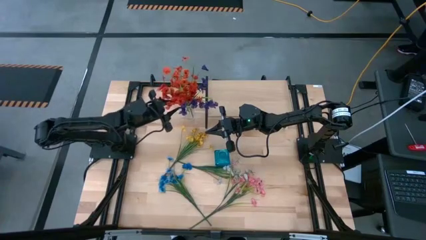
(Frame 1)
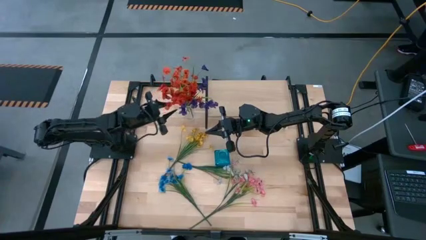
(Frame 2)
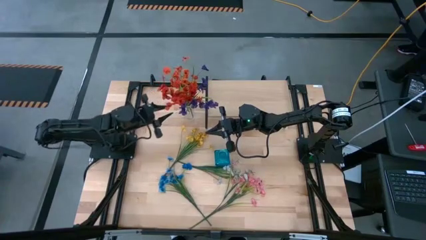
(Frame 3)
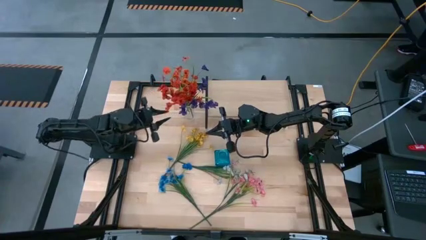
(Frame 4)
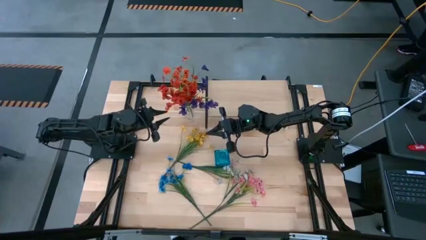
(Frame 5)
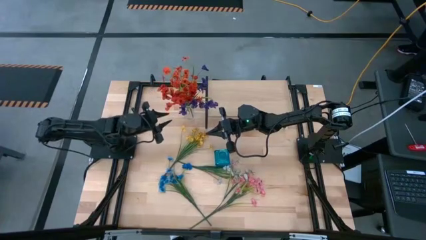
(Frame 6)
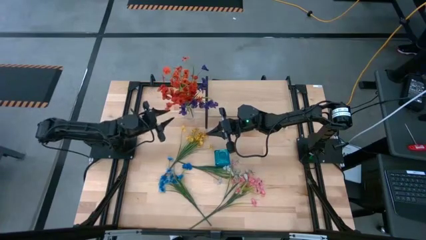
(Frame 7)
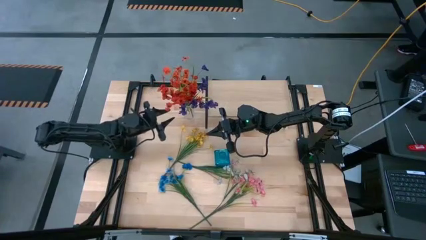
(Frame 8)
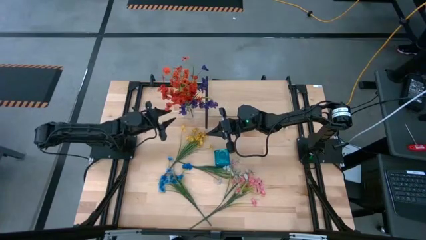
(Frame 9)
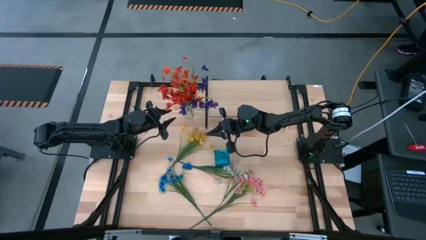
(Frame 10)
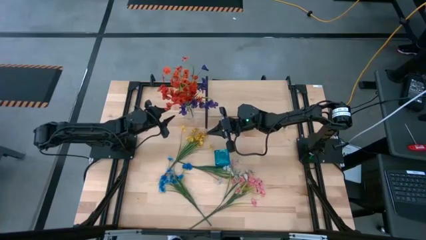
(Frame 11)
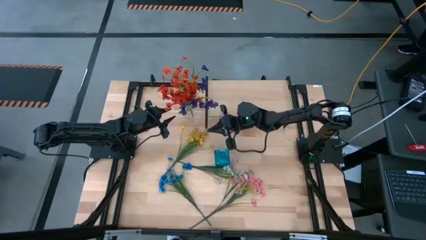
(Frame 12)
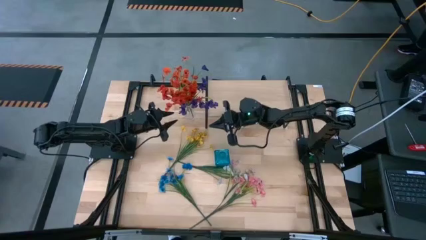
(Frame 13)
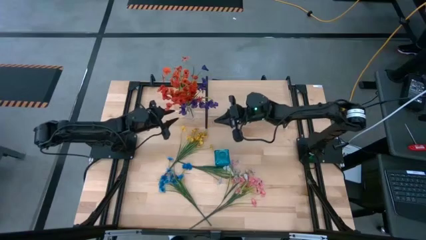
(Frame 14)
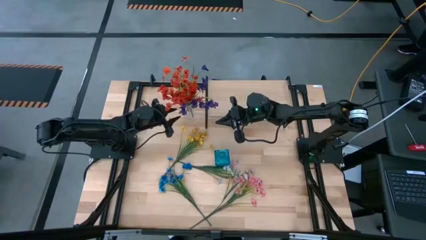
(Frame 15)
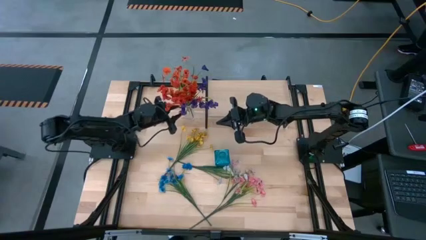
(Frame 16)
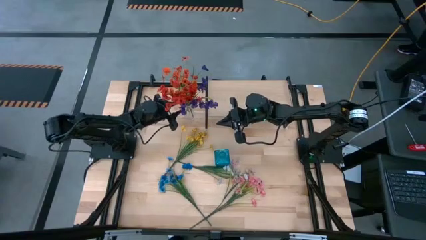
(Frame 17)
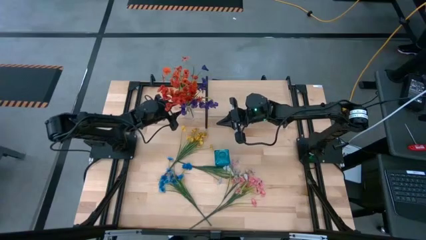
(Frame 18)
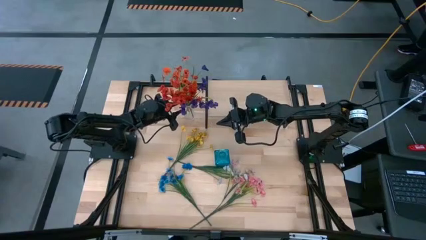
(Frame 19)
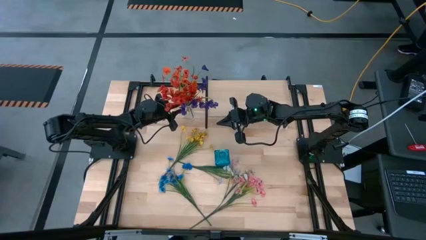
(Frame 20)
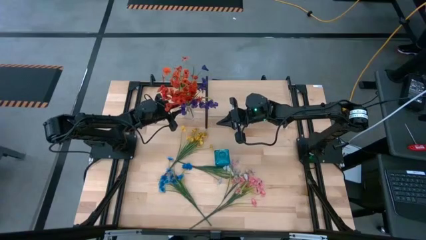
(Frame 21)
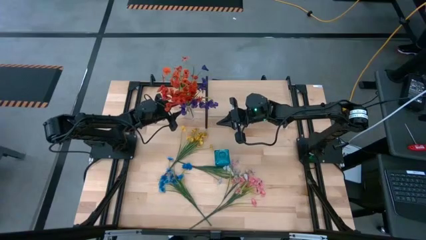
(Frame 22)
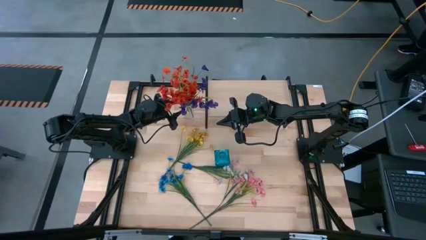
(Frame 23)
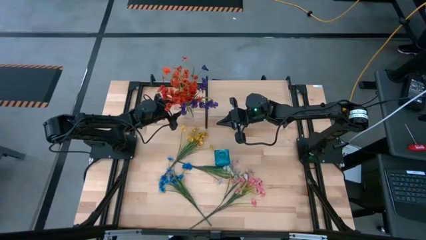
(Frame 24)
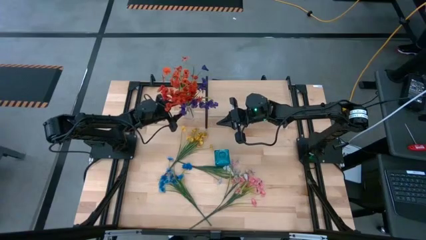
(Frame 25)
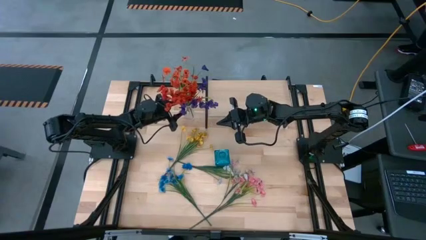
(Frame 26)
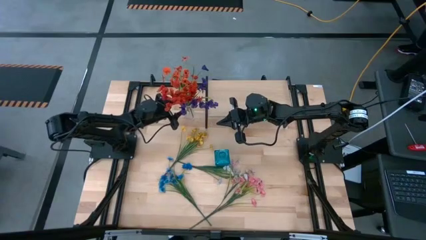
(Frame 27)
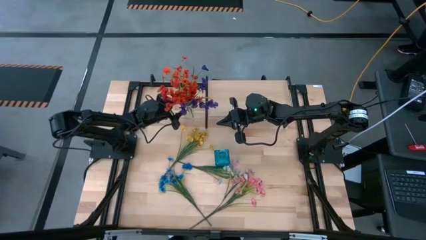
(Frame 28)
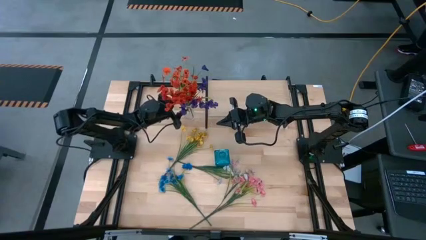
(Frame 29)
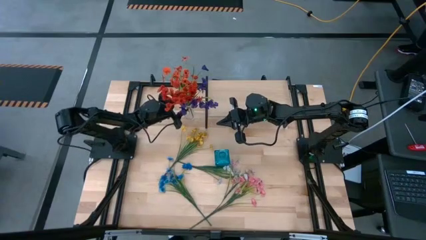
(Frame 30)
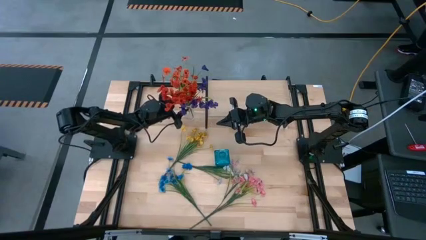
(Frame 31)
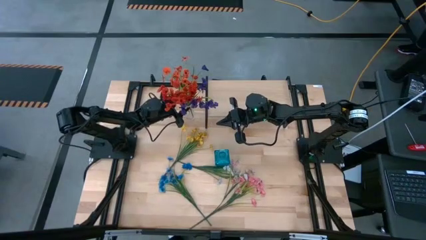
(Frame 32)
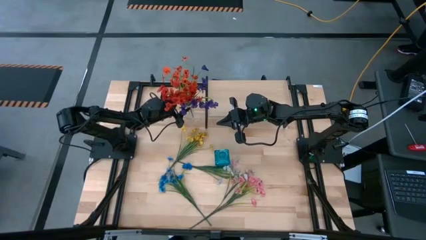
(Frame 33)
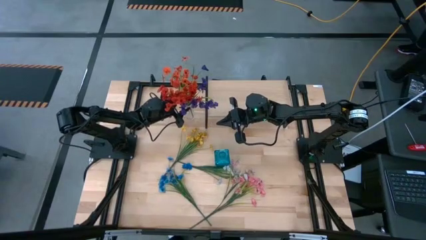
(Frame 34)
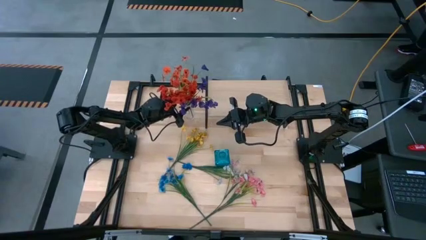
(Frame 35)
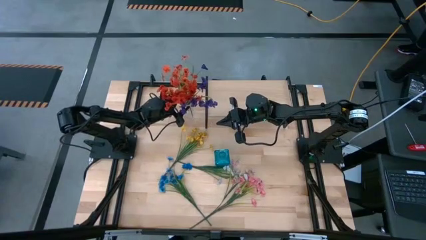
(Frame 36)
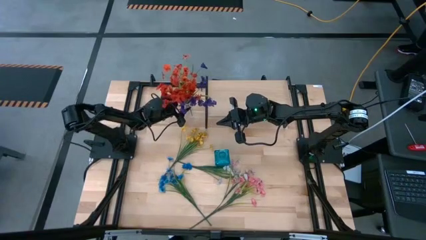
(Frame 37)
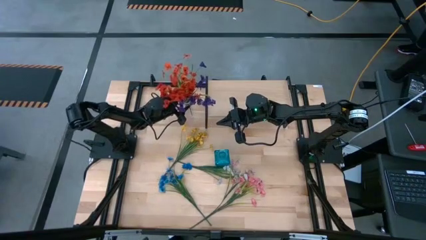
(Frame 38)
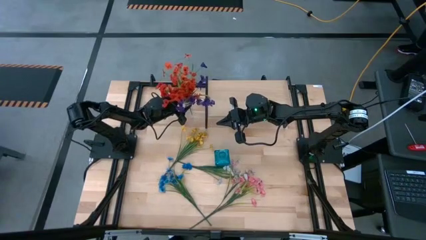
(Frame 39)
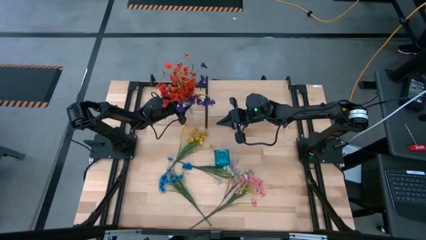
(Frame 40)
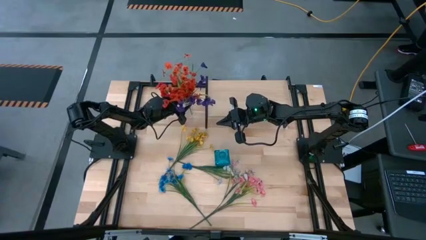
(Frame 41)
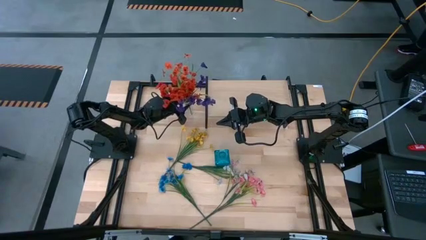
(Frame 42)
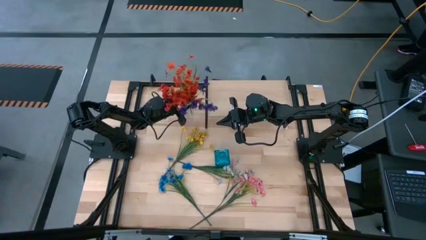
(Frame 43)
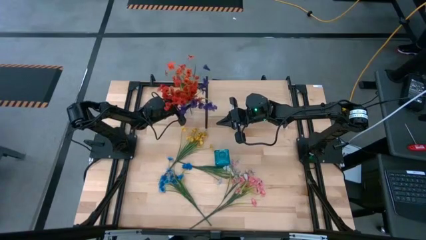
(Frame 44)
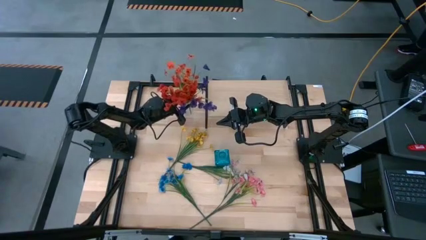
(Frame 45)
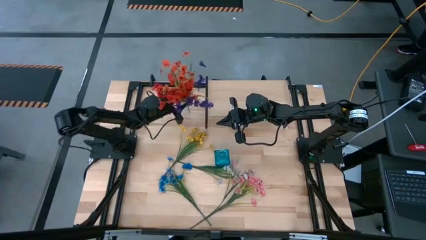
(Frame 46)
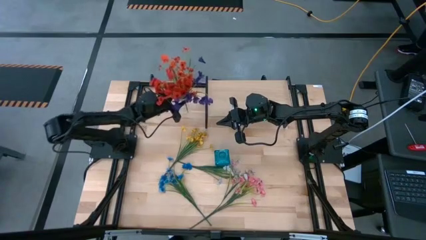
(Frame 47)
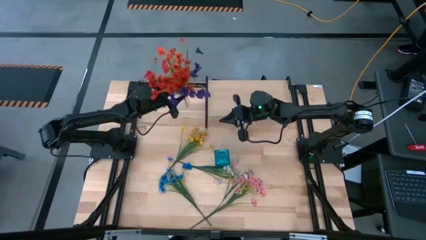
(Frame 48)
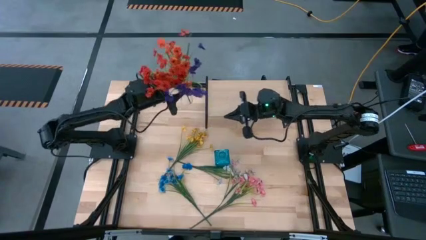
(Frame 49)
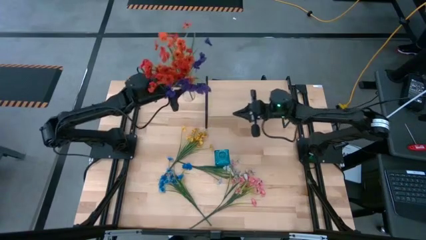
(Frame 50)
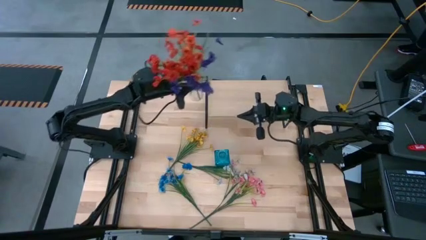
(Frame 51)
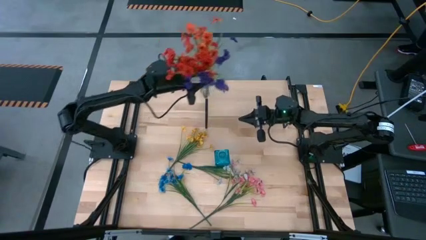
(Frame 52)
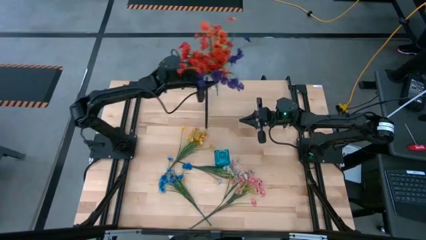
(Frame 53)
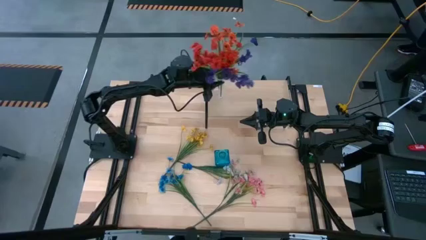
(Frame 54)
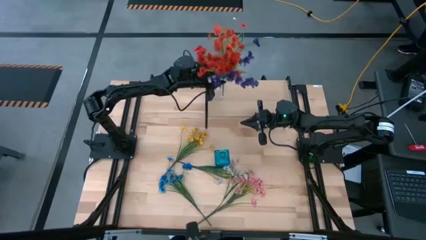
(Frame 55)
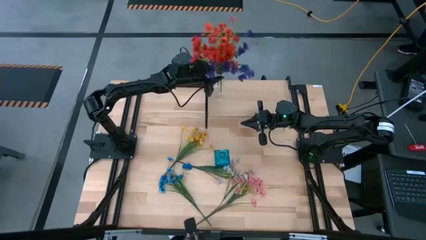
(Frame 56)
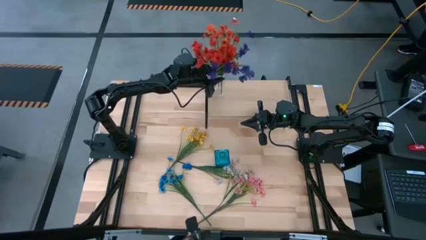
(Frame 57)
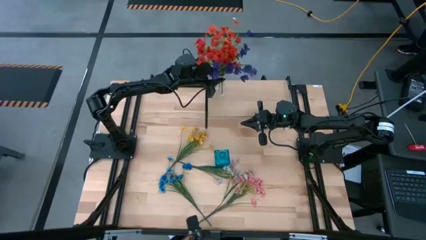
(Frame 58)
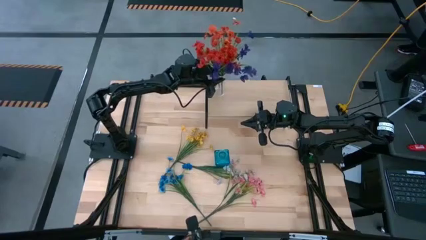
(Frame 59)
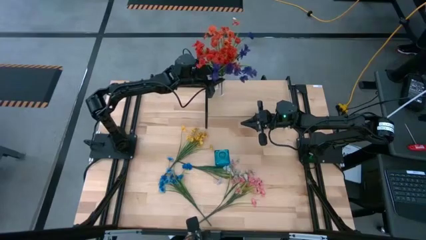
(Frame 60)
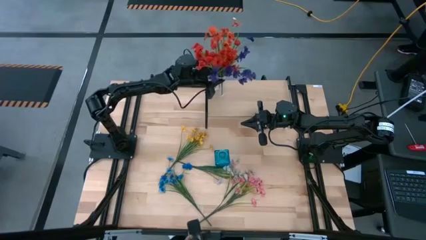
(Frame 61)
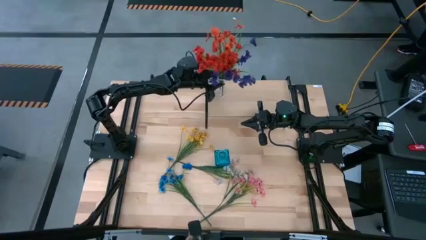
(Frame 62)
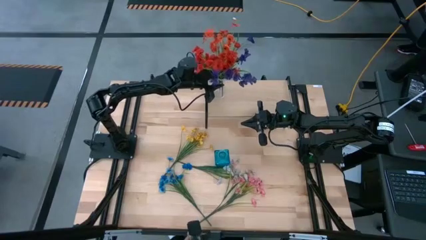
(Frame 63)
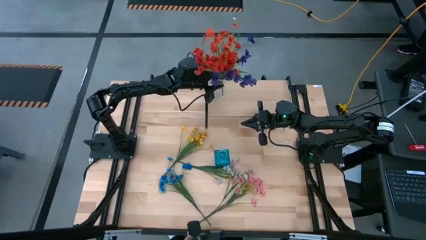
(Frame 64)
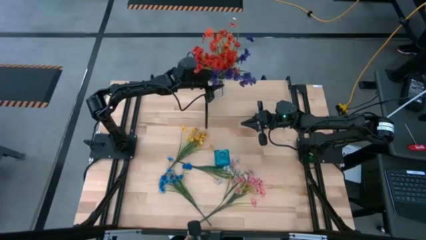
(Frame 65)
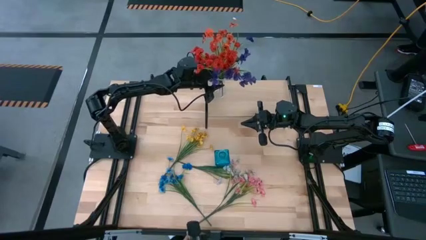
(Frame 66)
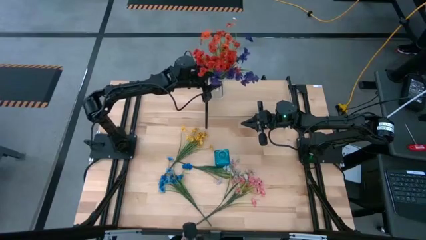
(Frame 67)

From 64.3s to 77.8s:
Task: Pick and place flowers into a vace then onto a shelf
Put the transparent vase with the flowers on the shelf
